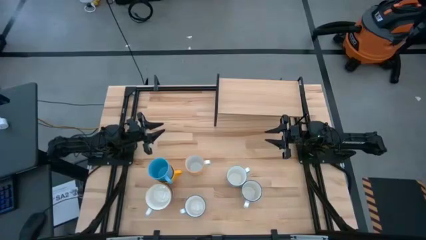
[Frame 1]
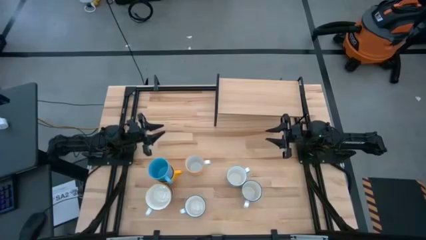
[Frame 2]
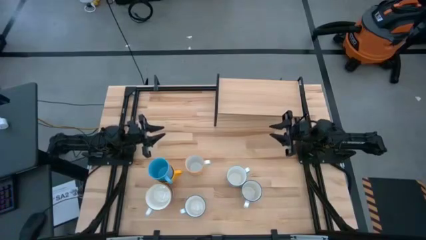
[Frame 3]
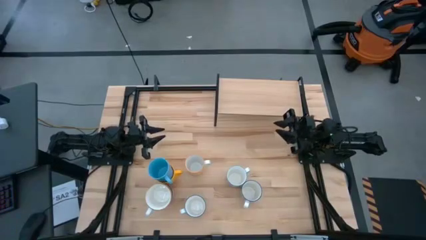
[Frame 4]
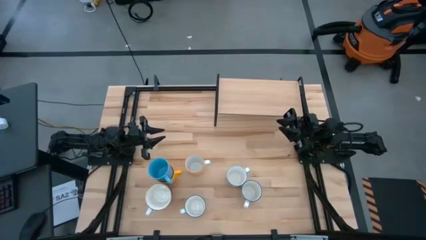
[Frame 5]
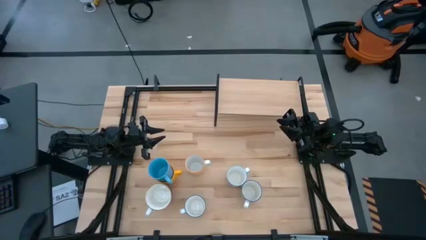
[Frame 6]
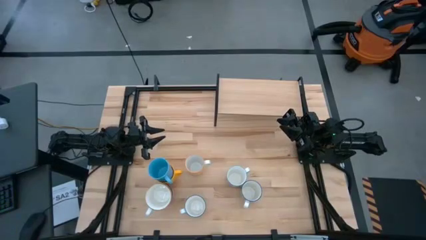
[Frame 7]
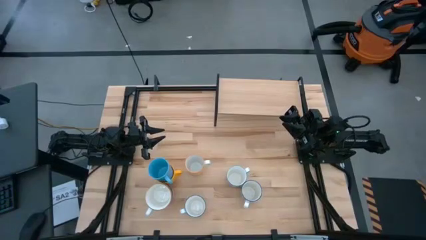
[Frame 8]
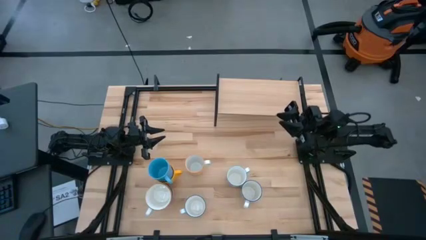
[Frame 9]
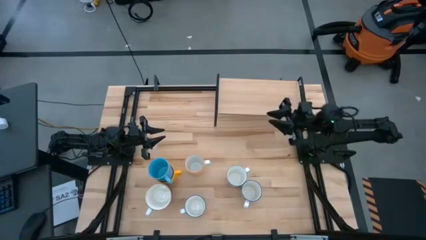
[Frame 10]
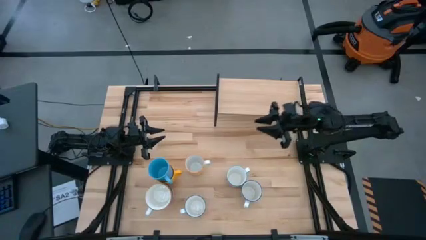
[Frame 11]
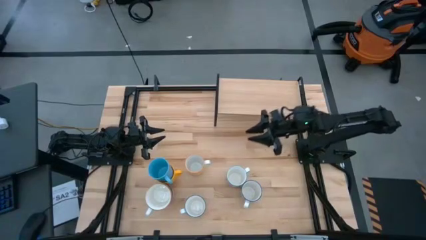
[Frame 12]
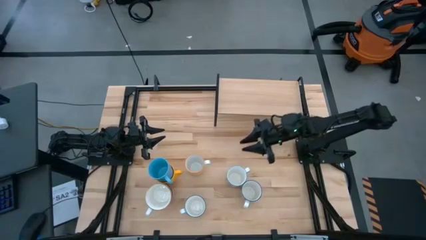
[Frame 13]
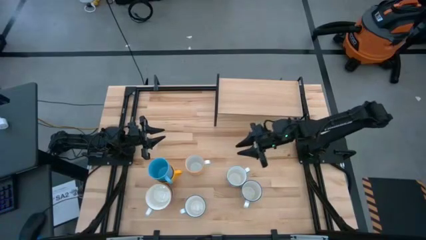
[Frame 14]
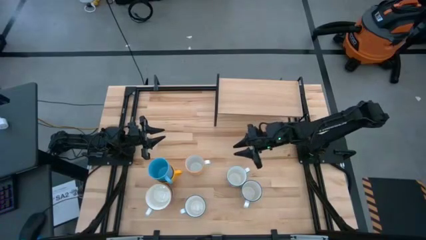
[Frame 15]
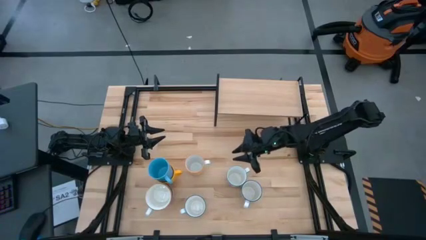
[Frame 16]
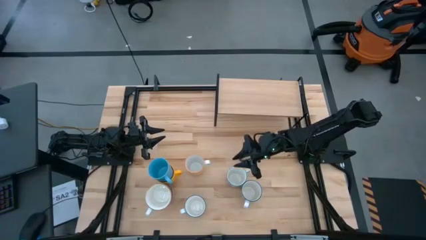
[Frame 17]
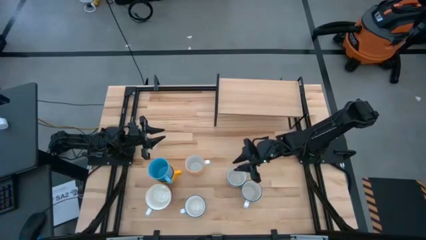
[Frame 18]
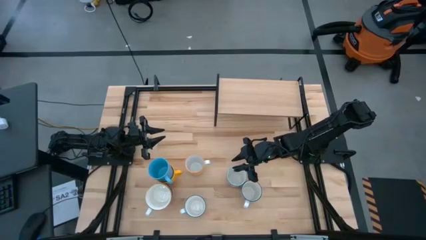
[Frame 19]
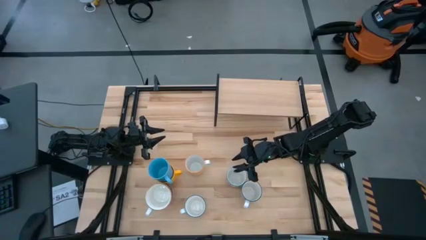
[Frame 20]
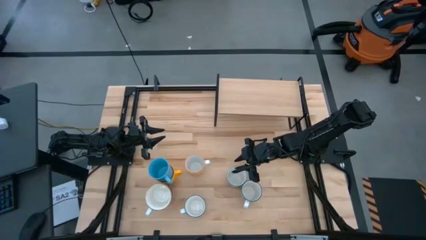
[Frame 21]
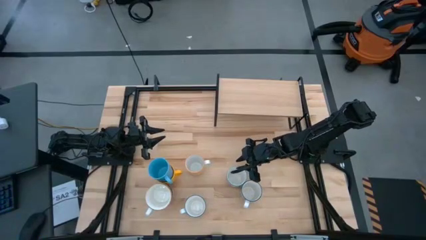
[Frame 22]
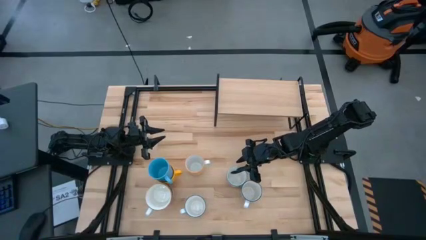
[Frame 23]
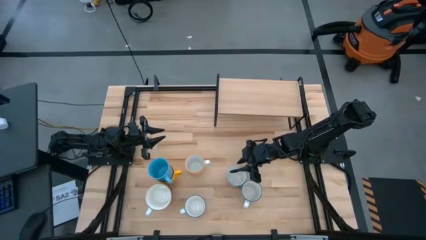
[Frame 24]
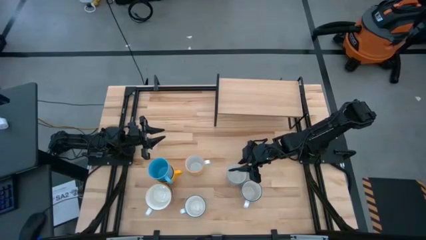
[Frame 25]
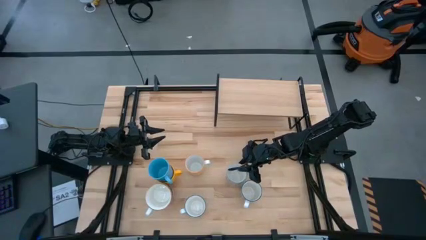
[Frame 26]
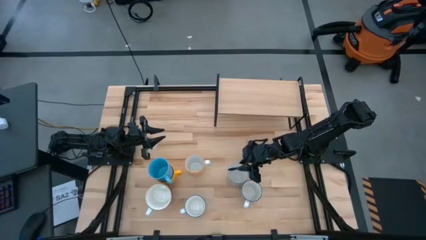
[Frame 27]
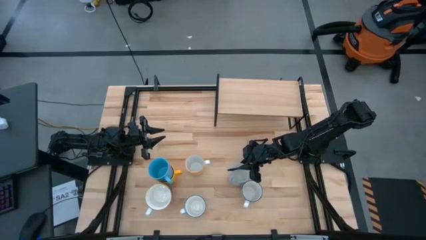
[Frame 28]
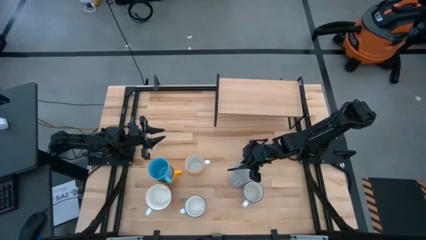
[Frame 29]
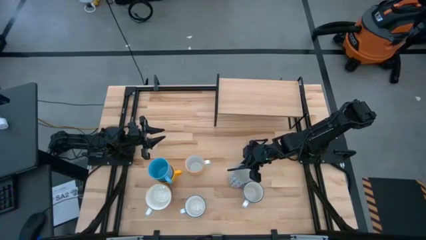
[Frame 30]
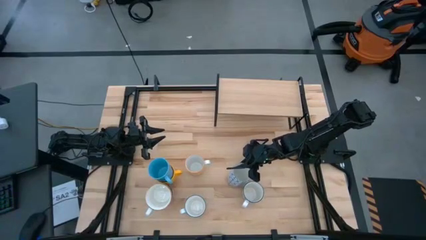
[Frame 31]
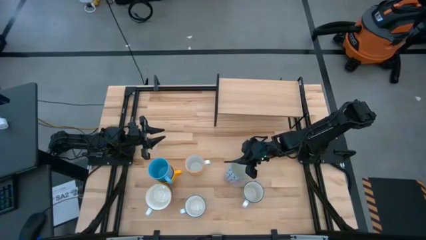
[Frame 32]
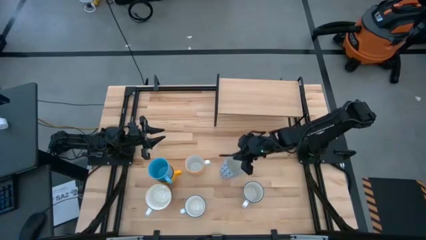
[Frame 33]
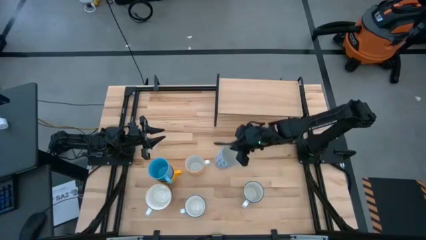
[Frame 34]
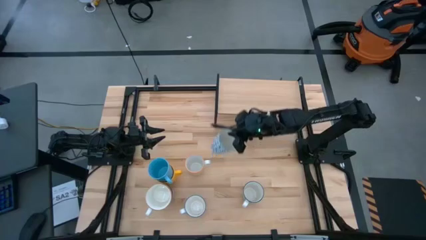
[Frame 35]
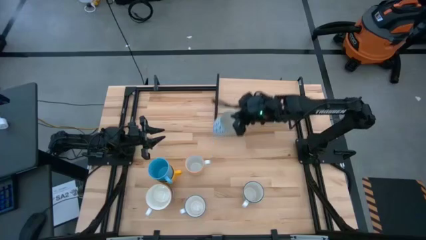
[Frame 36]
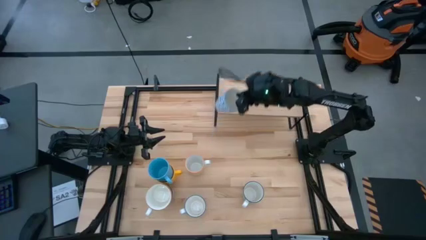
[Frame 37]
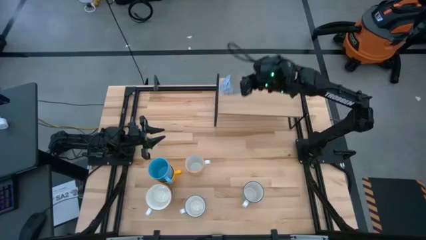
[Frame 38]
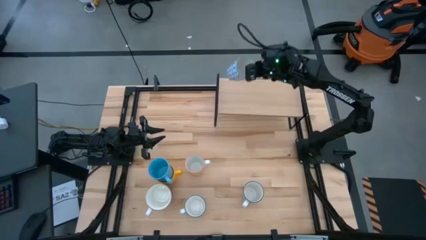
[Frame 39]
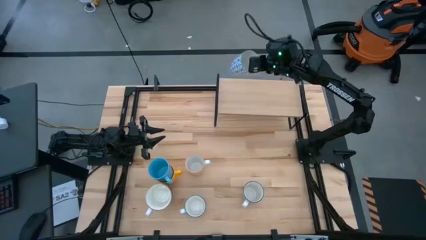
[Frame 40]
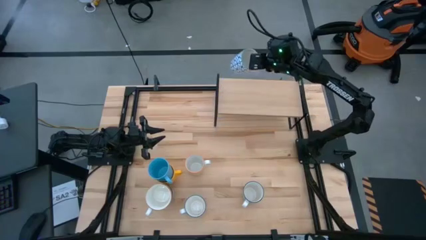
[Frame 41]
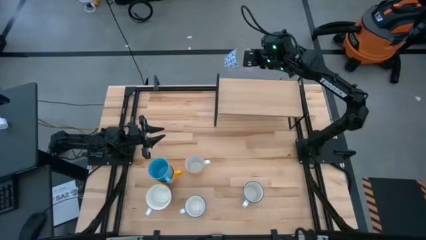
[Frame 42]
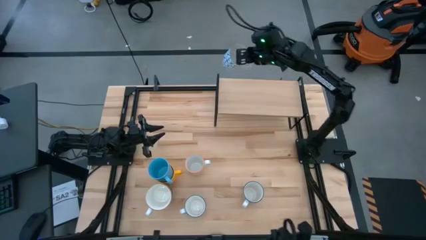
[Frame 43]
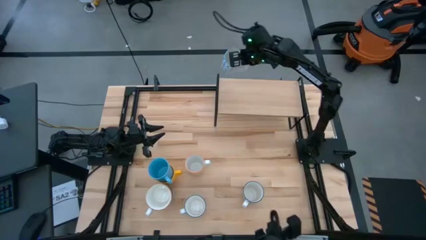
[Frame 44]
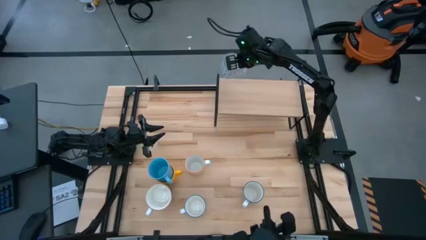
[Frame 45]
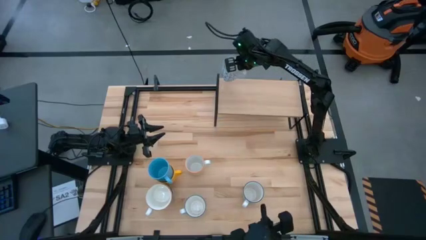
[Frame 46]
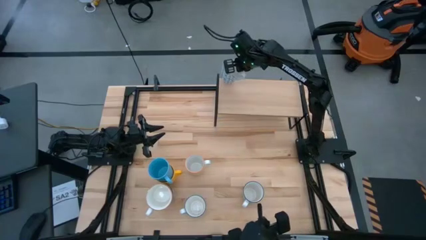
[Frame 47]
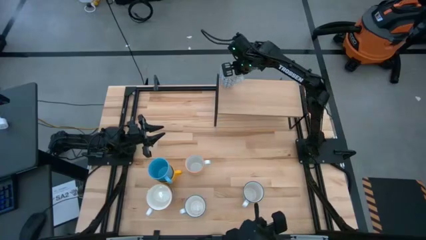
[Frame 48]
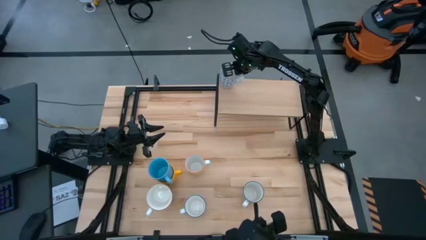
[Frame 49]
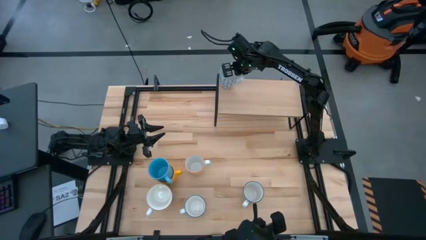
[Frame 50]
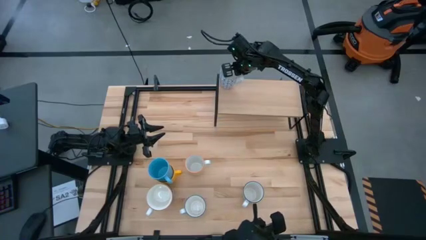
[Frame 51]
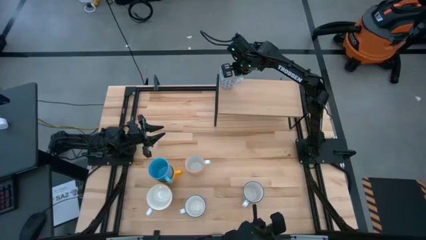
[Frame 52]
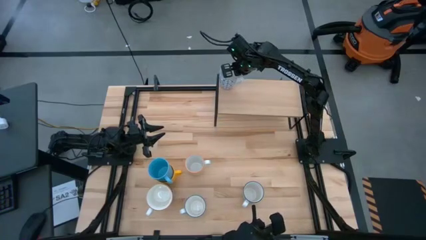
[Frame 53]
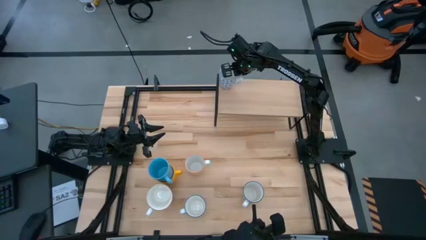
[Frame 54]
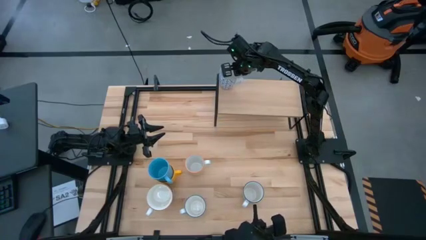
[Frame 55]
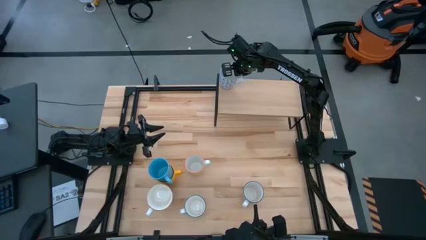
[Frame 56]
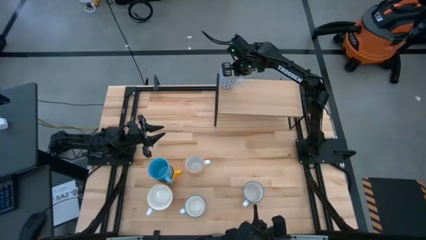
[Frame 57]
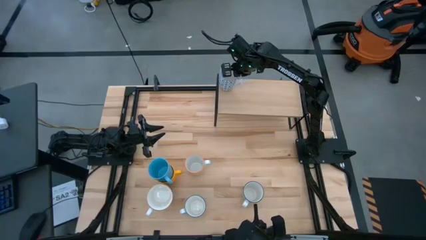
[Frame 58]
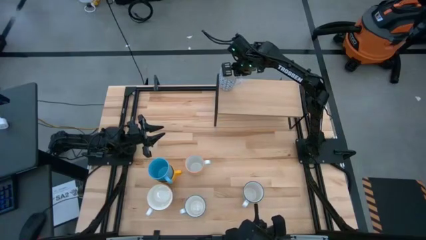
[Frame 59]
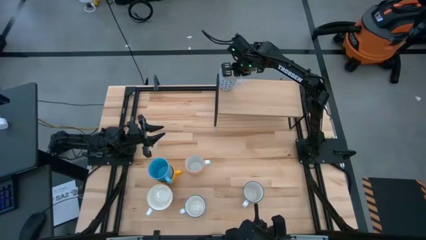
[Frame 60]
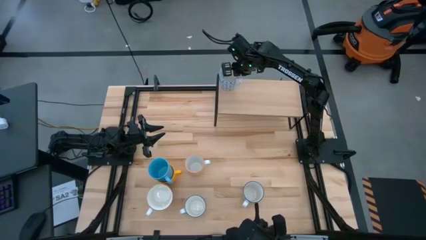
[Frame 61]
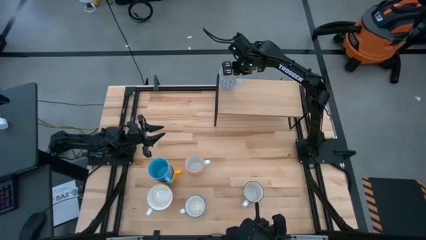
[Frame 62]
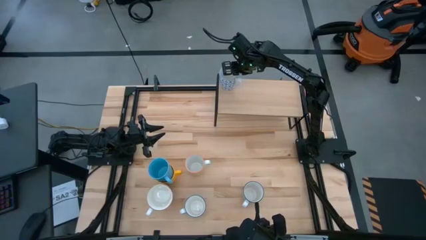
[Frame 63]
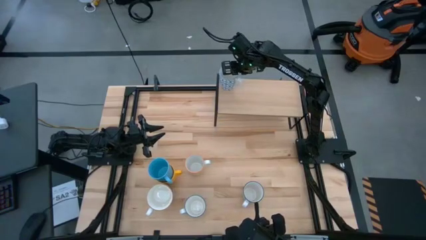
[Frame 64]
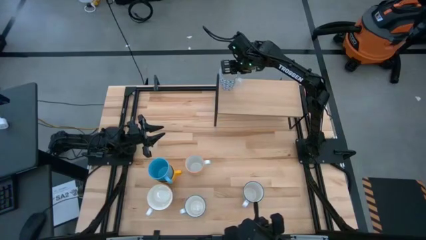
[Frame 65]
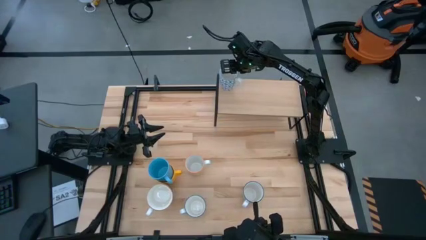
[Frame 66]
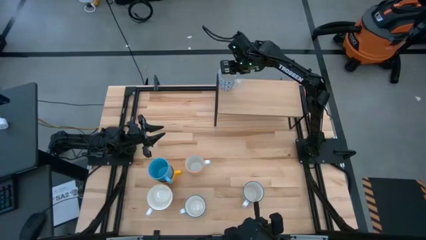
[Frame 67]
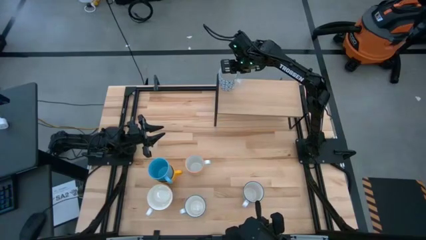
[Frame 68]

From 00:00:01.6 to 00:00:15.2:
Task: Place coffee mugs
Put the light blue pattern mug on the shelf
